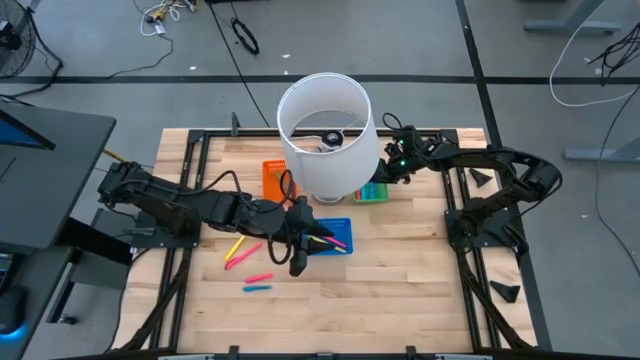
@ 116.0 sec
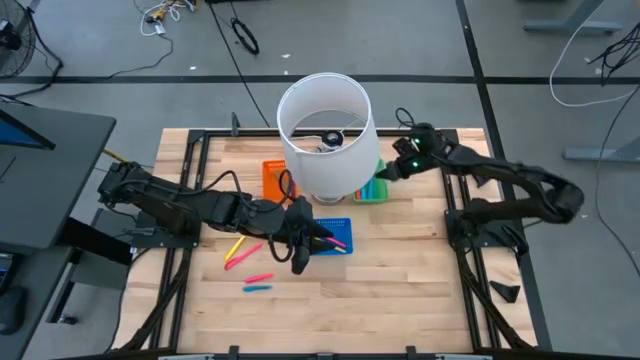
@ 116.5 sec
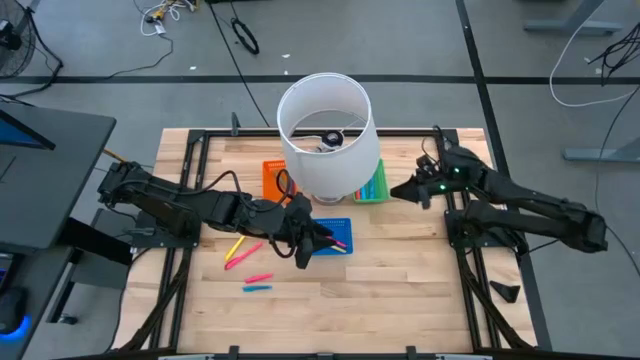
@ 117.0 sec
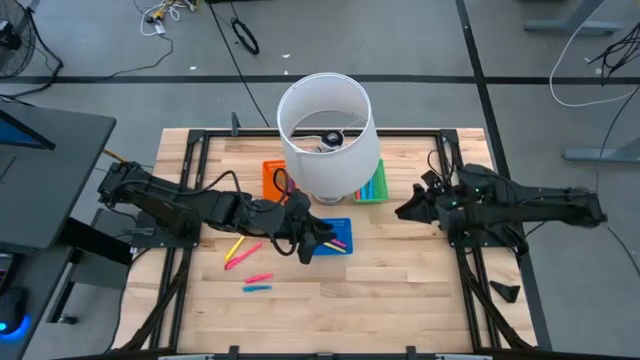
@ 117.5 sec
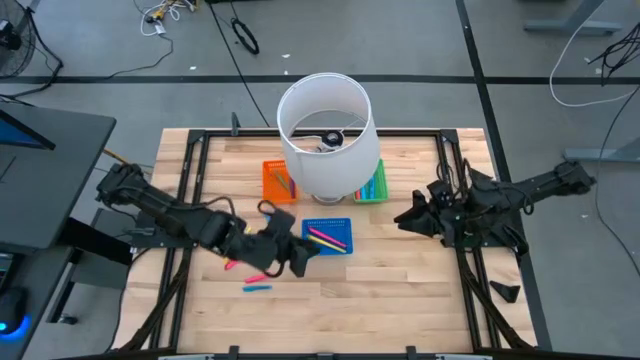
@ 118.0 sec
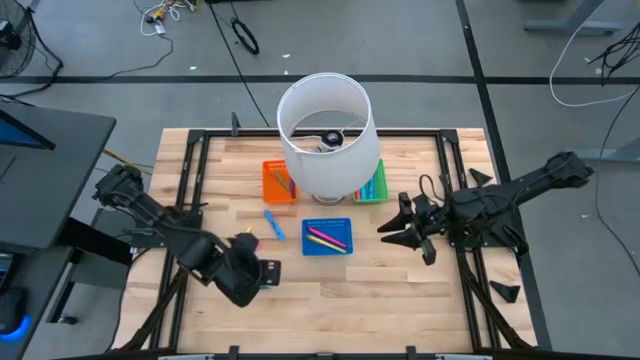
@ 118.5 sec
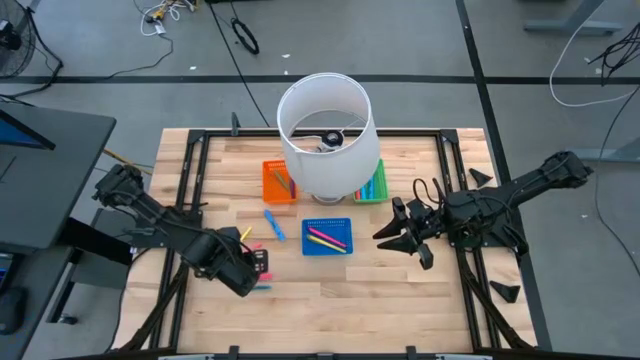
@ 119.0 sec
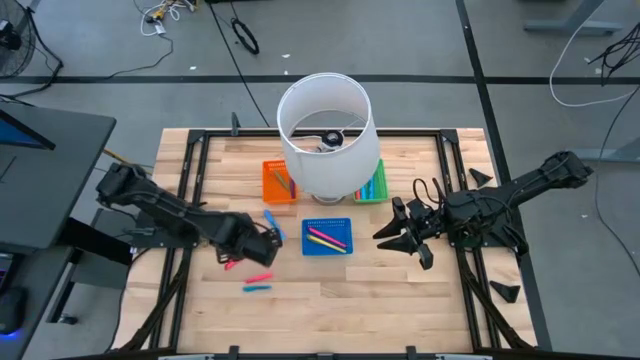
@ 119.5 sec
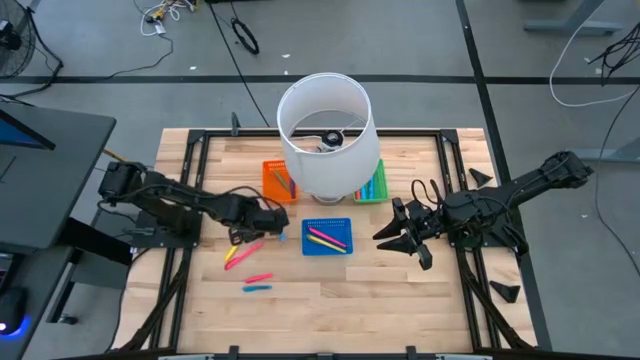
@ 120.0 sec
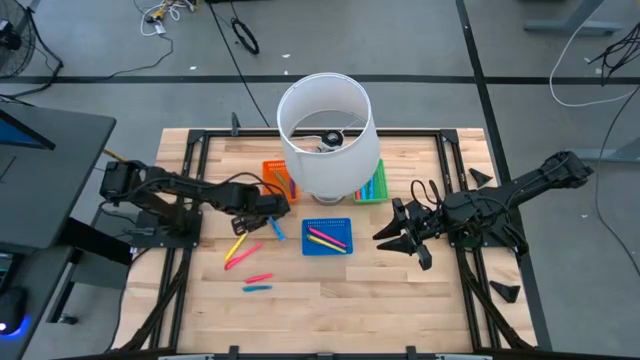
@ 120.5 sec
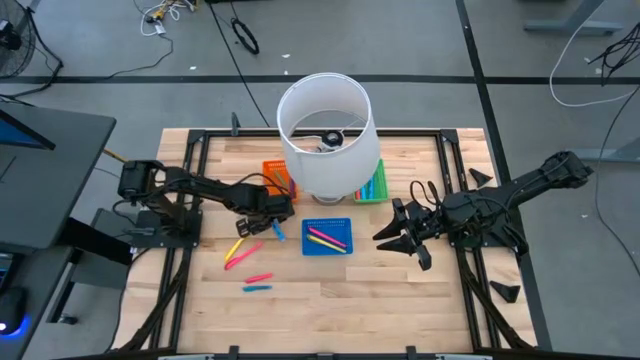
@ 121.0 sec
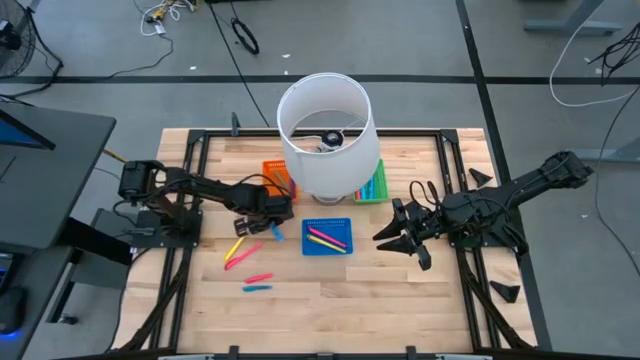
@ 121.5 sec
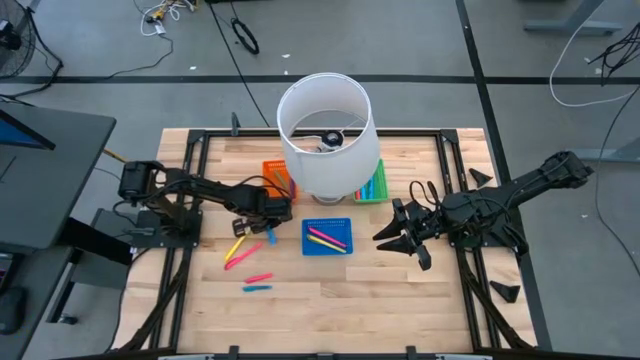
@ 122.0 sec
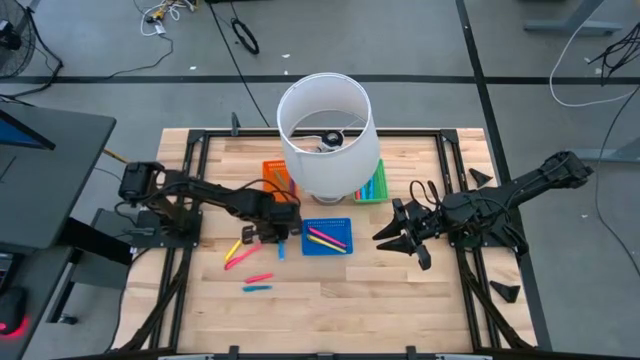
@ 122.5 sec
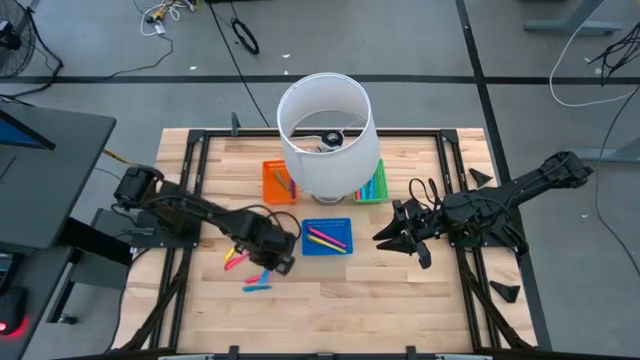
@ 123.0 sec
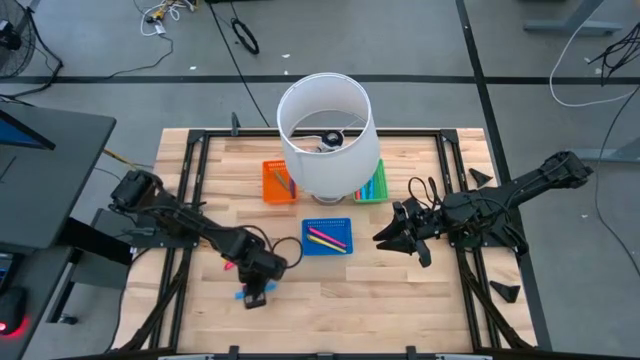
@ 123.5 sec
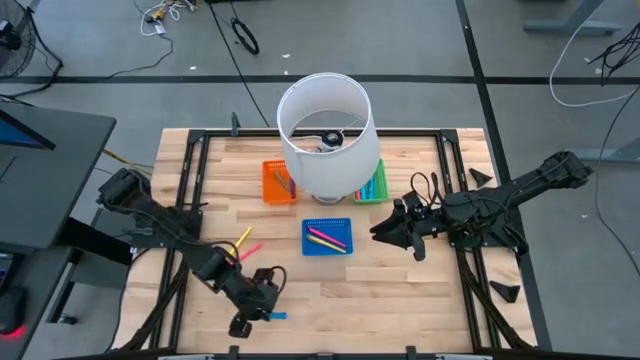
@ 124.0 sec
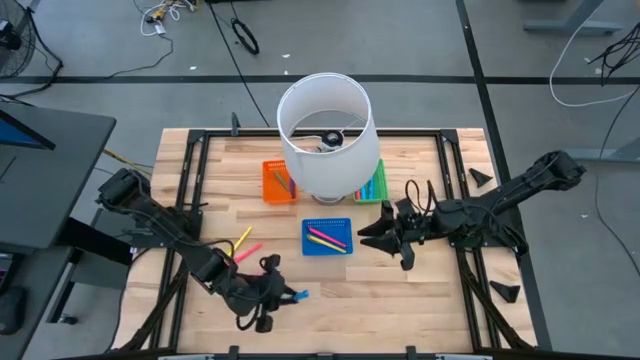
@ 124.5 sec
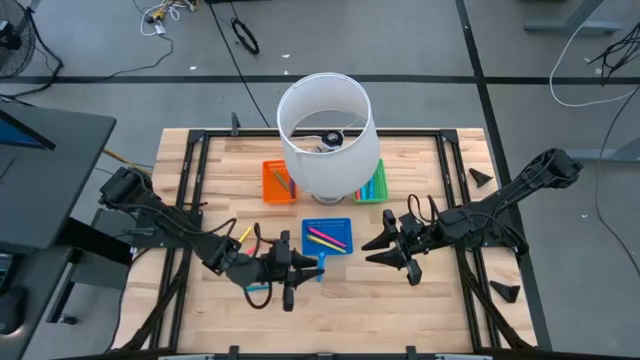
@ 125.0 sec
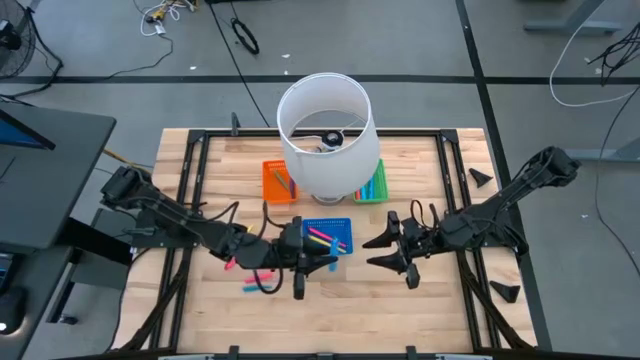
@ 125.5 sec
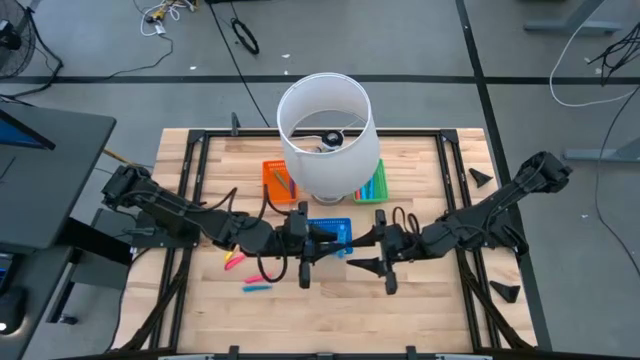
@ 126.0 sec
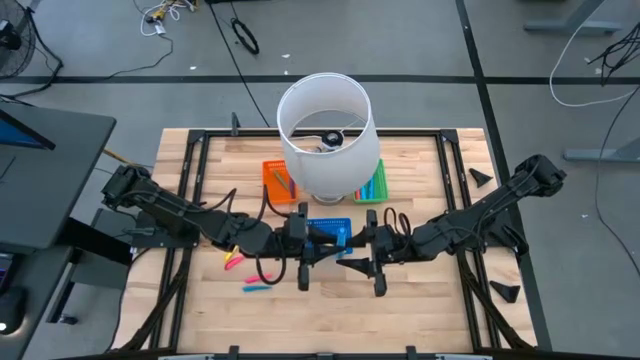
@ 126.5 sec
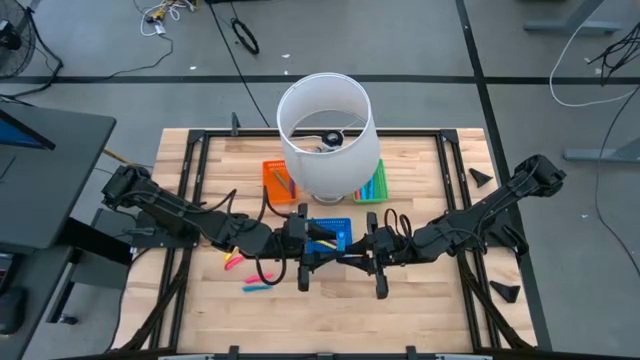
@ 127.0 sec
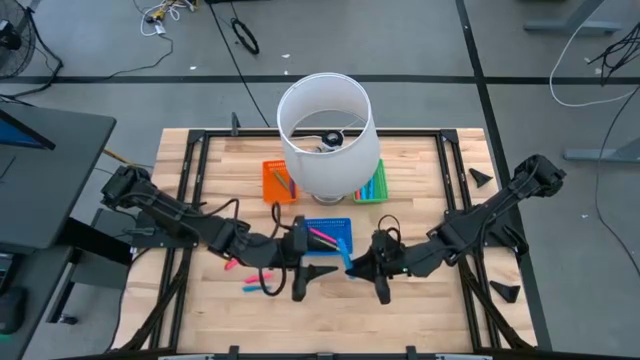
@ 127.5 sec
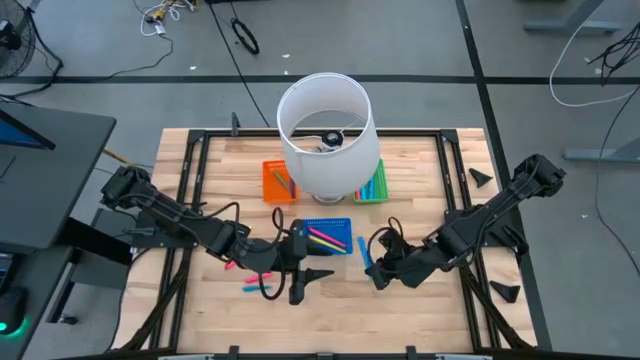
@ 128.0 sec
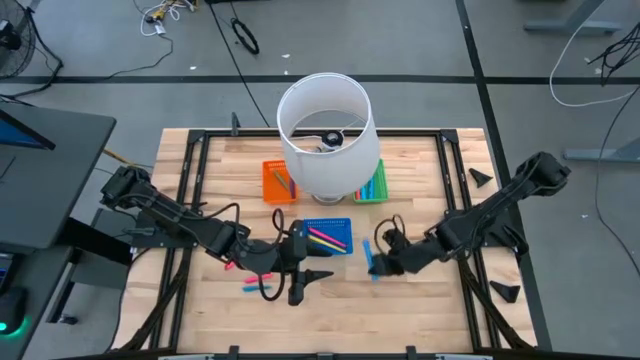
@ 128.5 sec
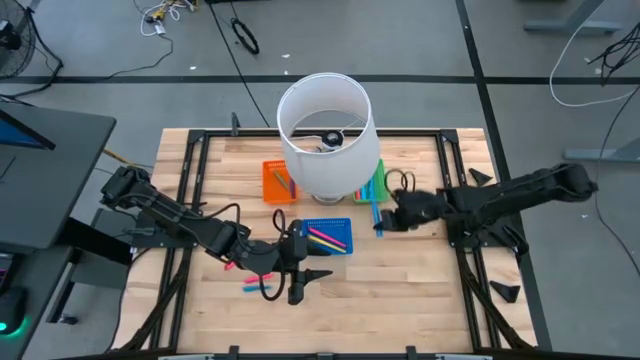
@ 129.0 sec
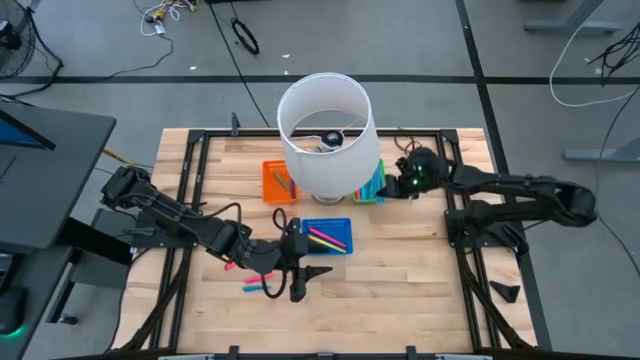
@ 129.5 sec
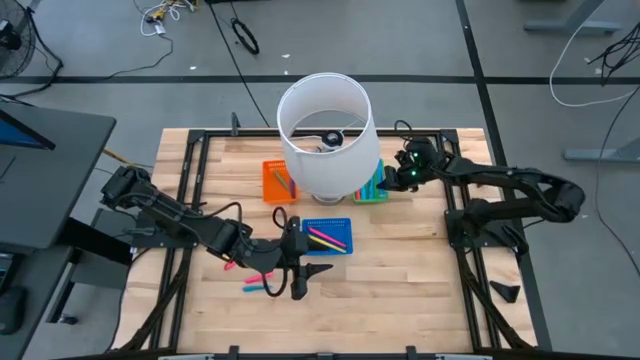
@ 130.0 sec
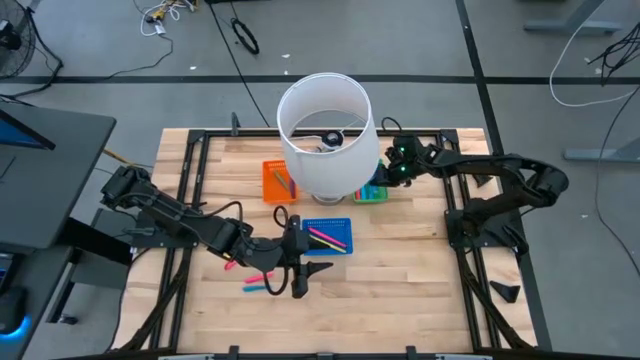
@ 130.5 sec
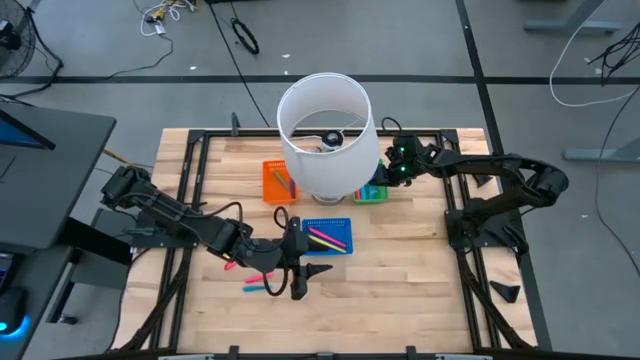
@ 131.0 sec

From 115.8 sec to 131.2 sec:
Task: Pick & Place Markers
Put the blue large highlighter pen into the green bin
